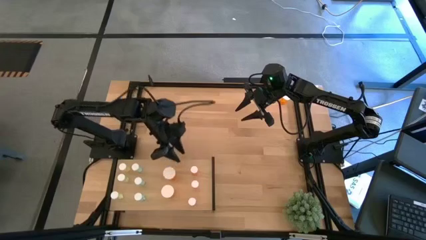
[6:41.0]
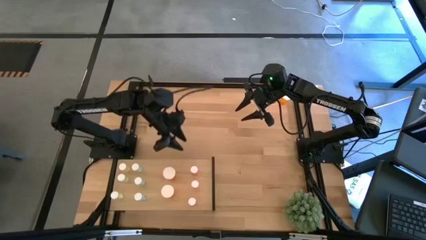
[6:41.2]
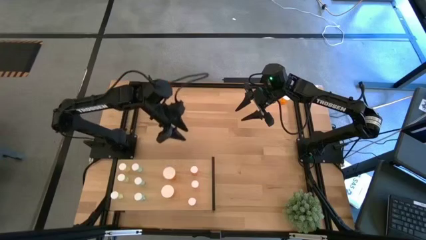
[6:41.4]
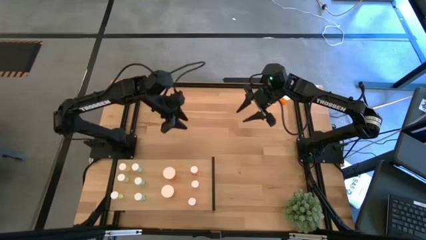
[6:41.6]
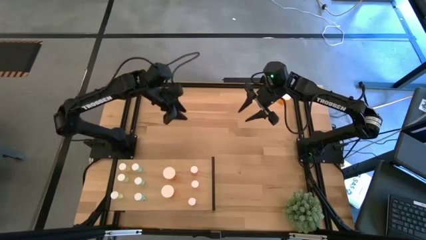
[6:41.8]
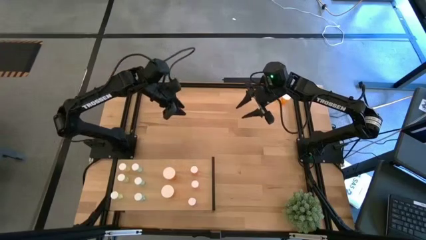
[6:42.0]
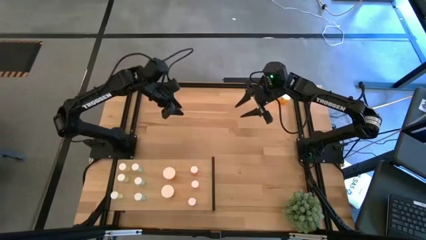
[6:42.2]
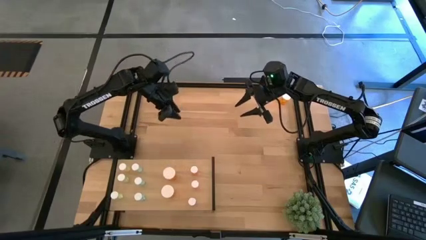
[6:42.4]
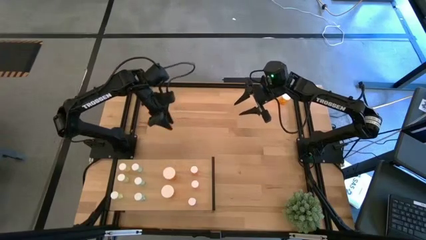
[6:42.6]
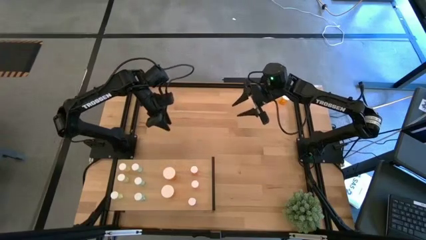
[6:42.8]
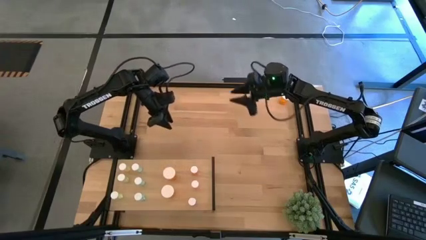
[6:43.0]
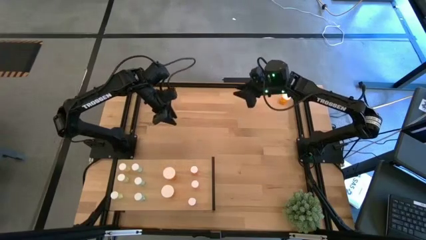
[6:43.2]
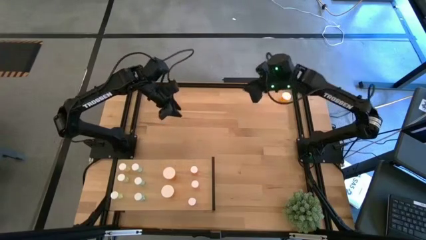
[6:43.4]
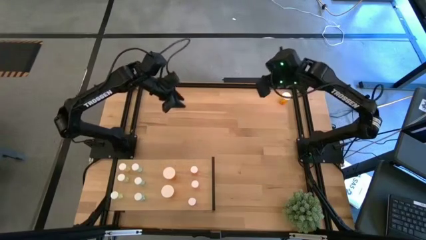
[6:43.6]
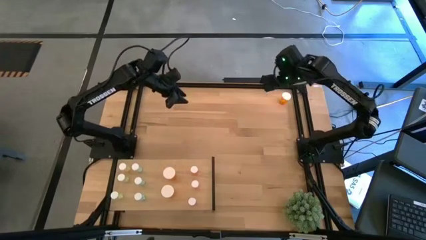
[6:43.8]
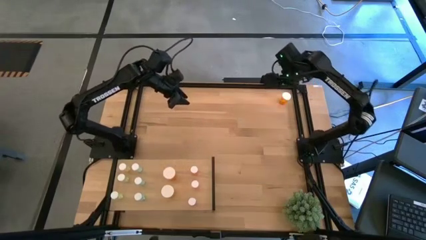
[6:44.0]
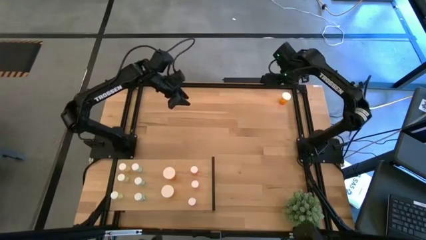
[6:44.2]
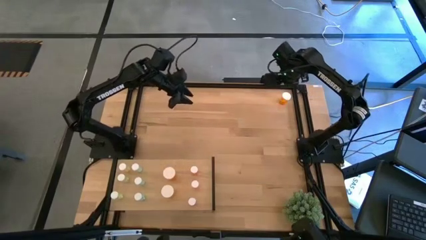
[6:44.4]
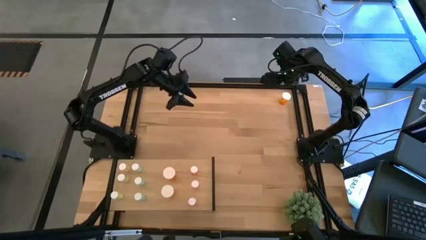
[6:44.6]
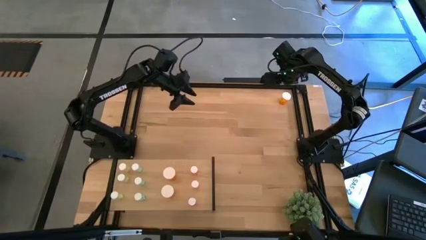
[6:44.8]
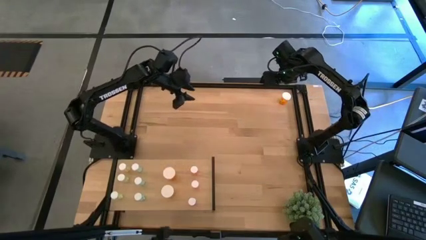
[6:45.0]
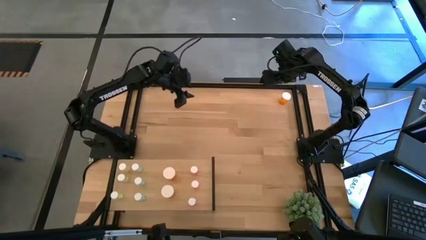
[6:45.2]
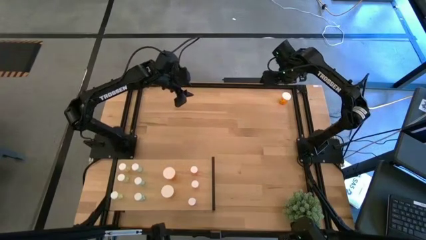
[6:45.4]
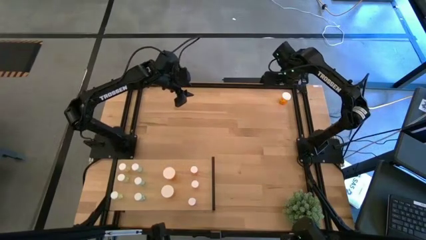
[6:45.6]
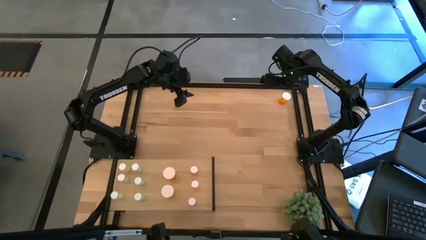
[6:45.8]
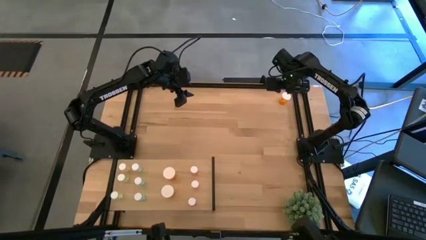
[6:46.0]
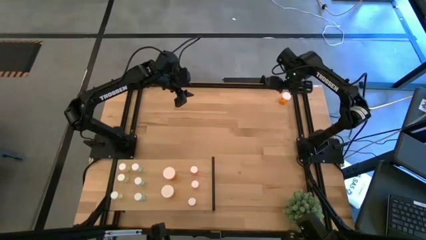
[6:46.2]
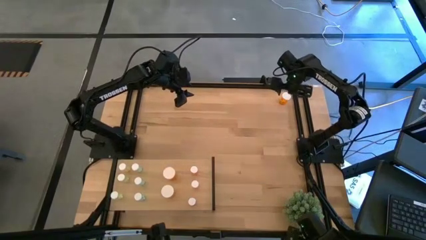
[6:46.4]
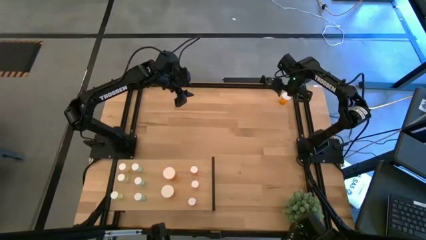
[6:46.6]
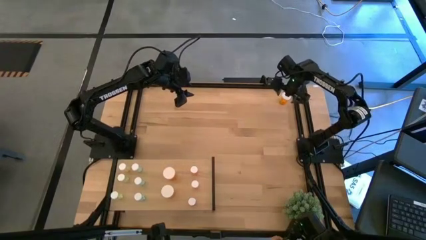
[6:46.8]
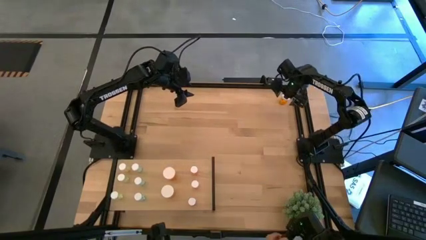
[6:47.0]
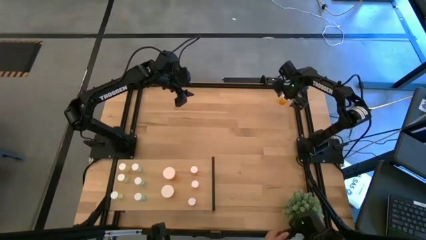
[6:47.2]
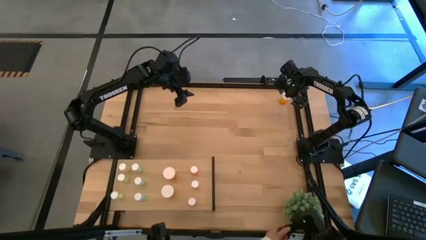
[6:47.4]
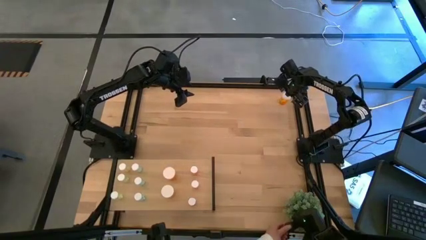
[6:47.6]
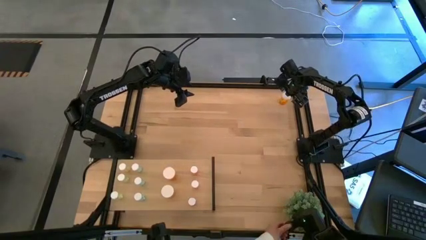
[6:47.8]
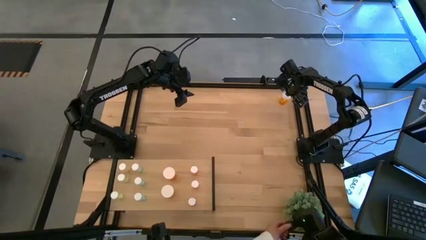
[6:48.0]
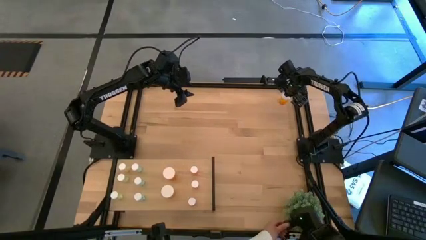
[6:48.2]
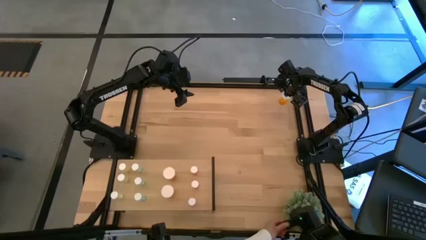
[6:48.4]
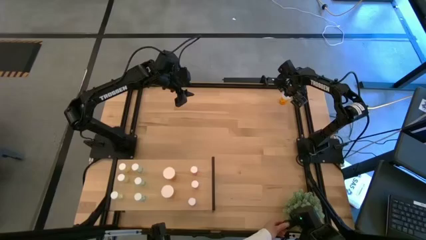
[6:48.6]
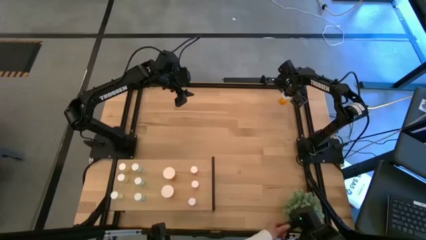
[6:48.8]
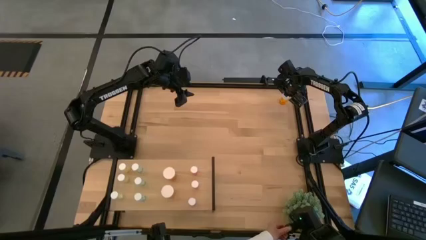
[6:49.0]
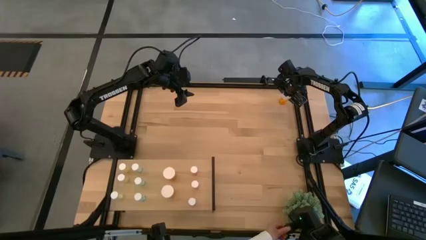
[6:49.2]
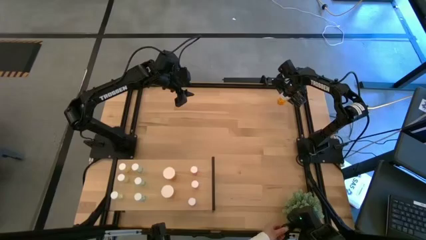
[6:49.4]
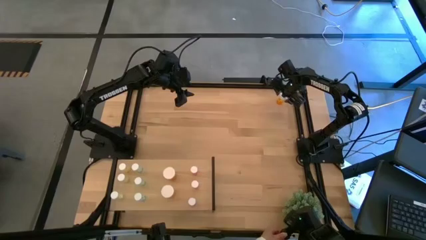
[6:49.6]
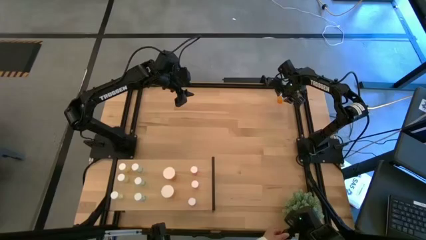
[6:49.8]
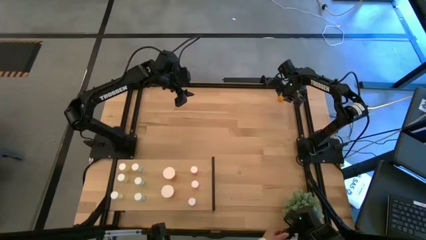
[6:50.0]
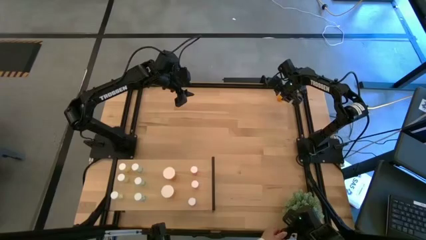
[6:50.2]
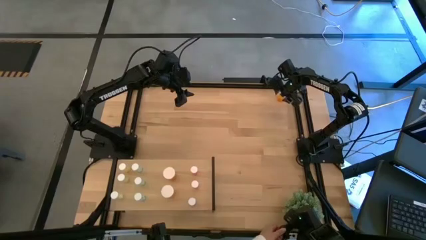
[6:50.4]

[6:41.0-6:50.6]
Task: Pick and place medicine bottles onto shelf by color
Put the orange pill bottle on the shelf aligned with the other orange pill bottle

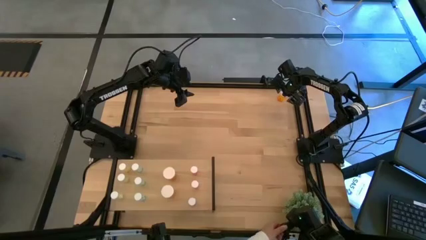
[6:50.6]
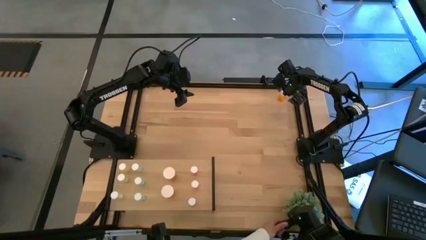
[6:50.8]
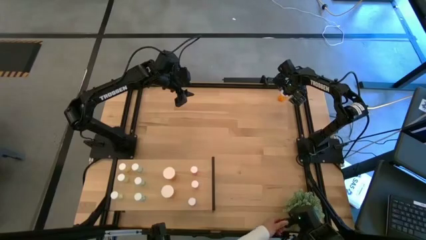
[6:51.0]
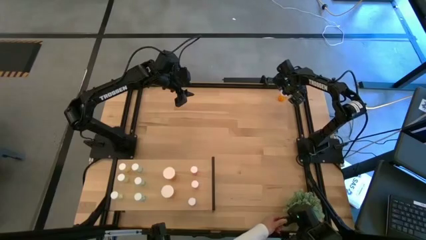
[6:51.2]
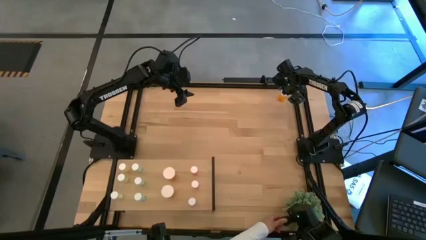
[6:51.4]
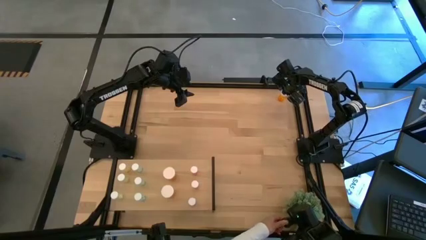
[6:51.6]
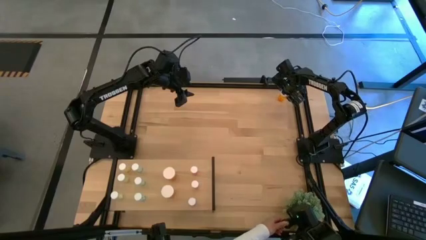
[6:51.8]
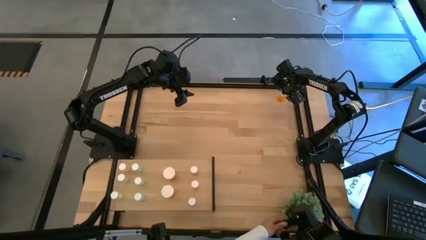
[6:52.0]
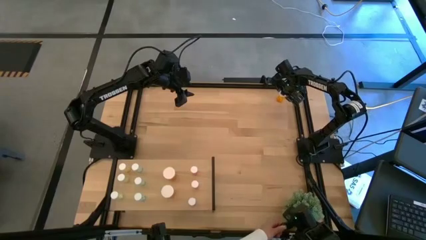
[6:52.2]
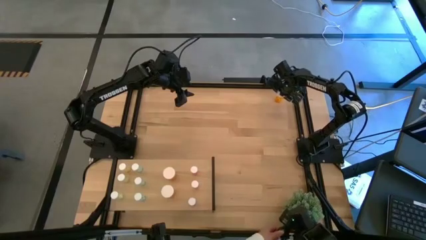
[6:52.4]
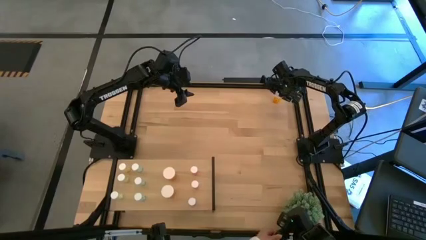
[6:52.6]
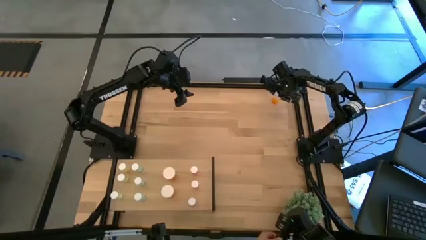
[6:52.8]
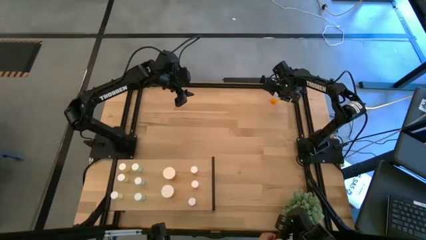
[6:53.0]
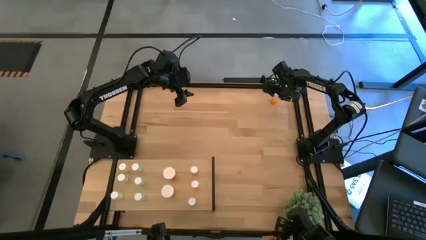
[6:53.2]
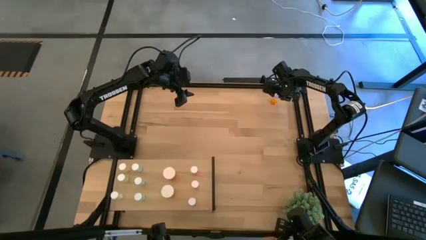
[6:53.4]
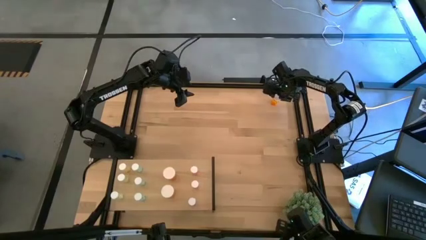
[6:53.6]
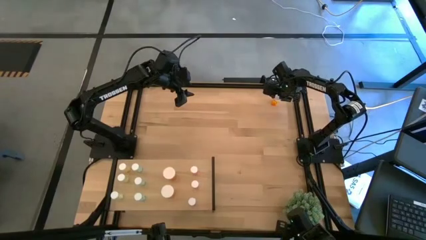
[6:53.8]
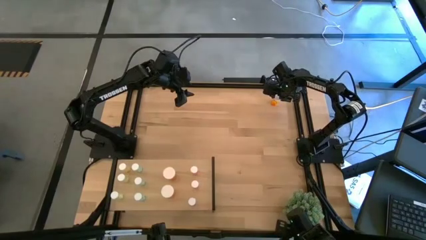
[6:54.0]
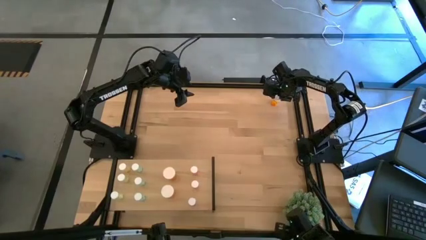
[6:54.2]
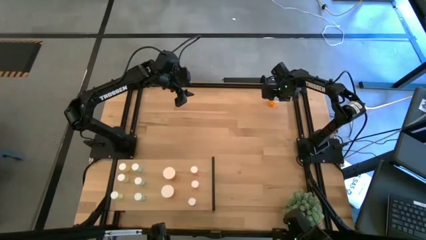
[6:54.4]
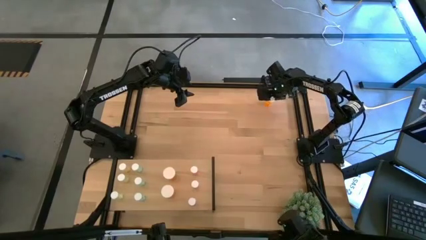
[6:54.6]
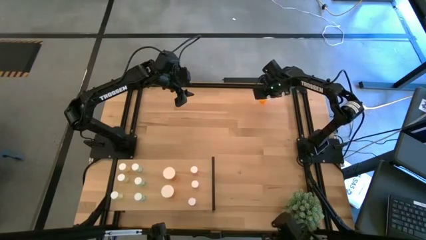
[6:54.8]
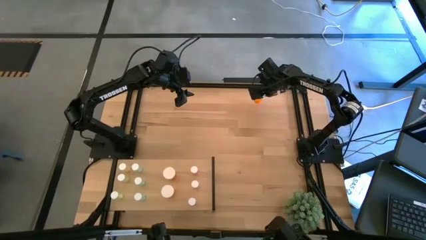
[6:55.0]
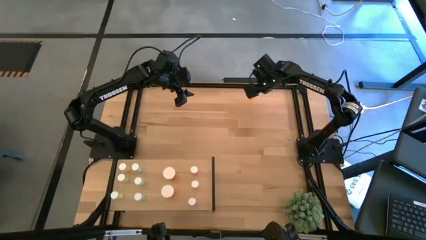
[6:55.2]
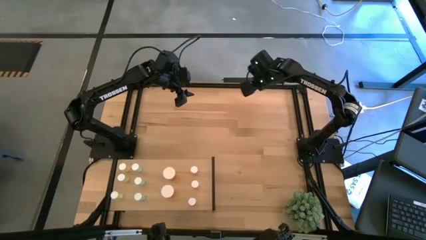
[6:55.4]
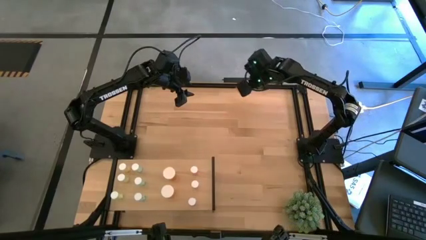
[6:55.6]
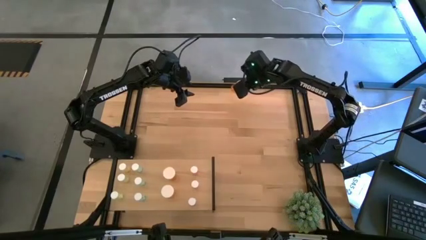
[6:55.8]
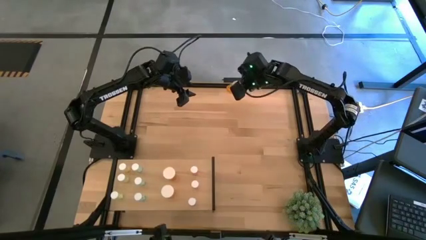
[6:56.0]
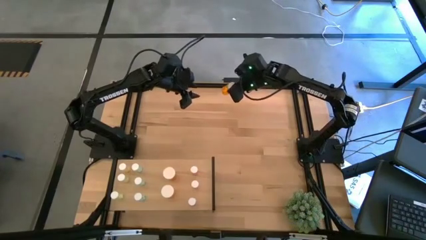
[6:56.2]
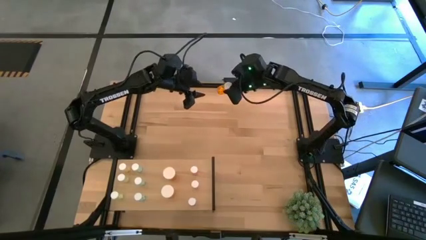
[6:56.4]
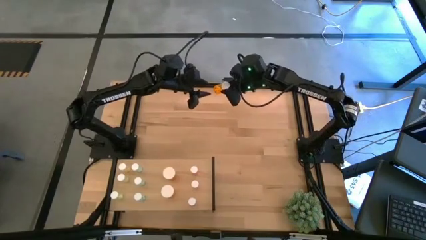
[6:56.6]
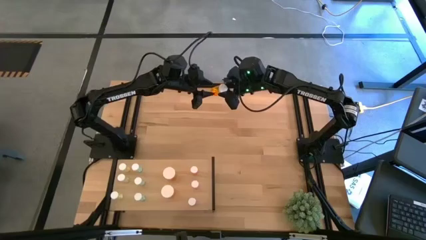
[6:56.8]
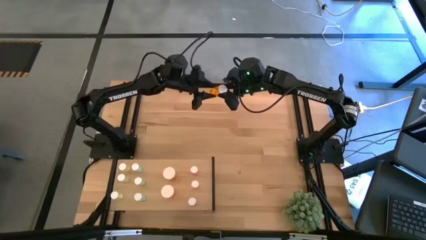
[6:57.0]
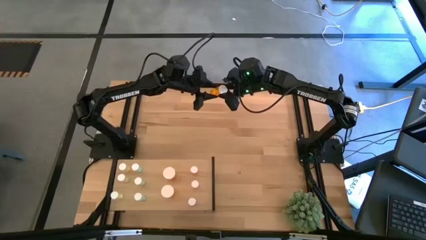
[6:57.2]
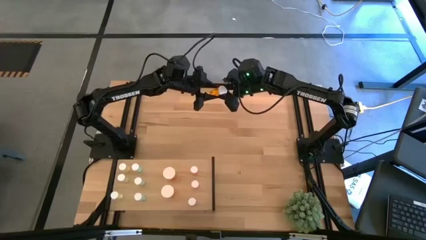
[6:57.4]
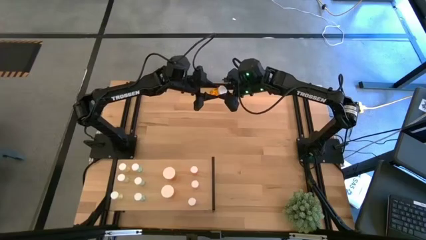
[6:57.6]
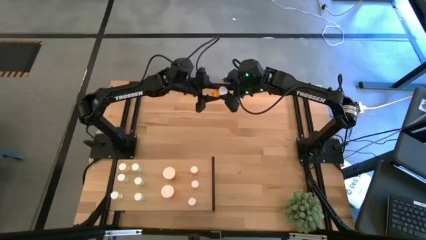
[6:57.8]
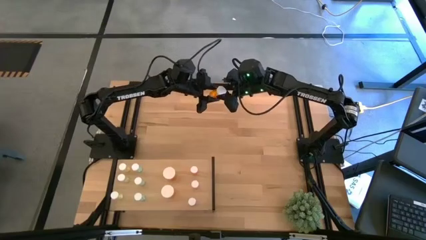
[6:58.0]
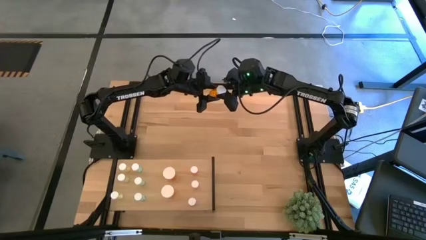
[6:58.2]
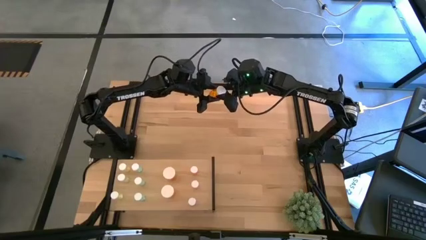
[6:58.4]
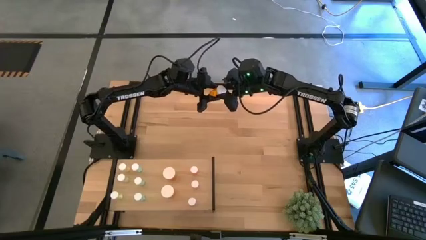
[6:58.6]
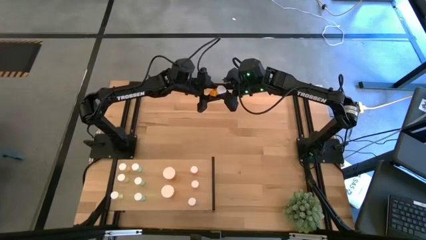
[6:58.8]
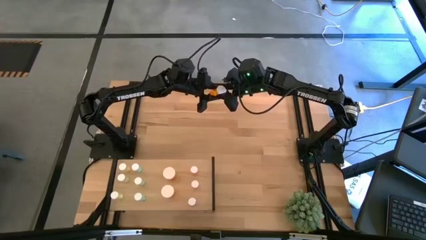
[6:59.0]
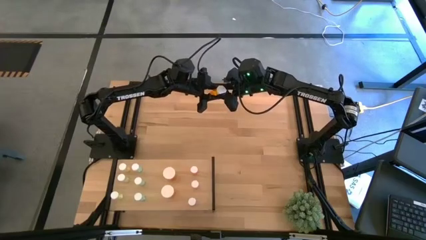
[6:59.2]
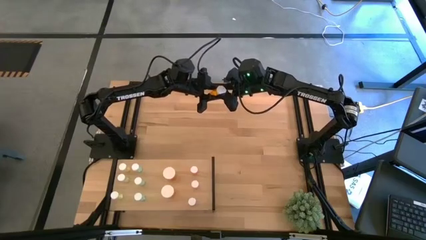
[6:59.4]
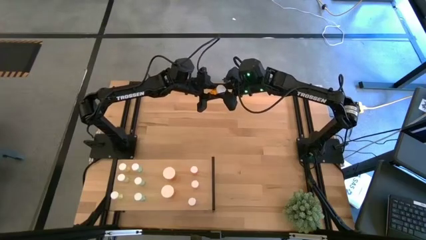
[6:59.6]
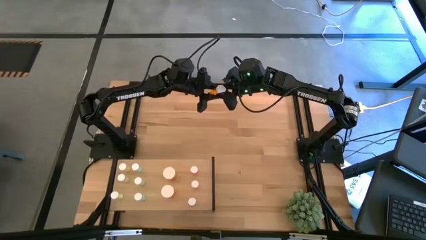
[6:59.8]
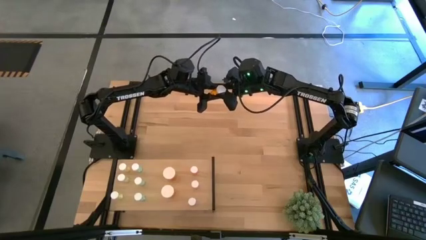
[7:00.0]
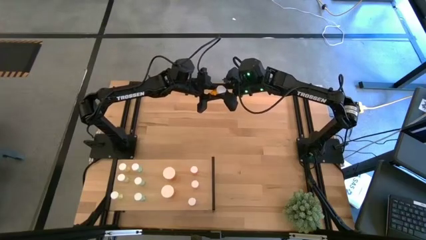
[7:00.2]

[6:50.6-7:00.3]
Put the orange pill bottle on the shelf aligned with the other orange pill bottle
